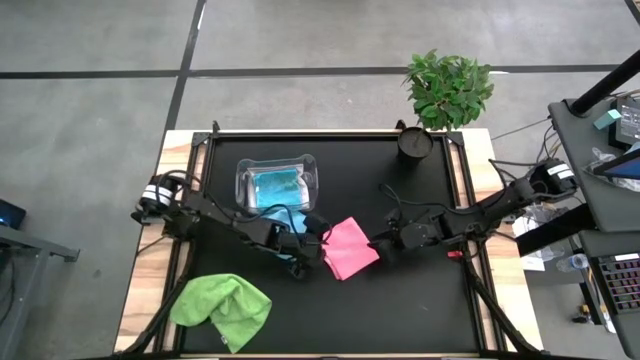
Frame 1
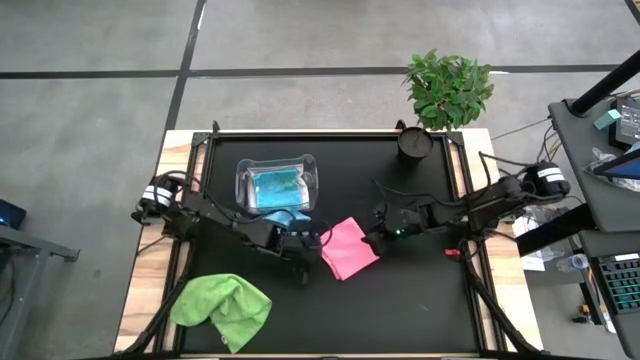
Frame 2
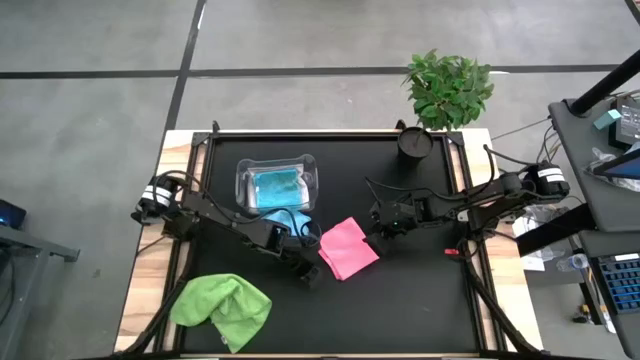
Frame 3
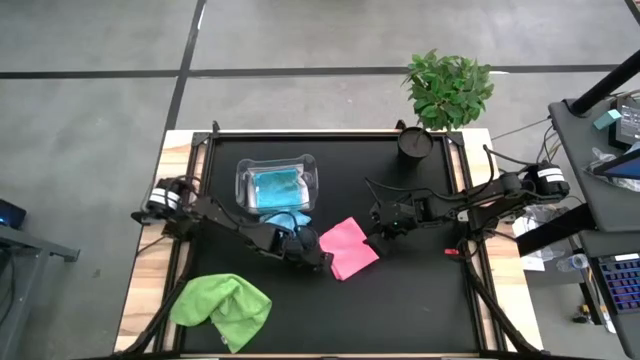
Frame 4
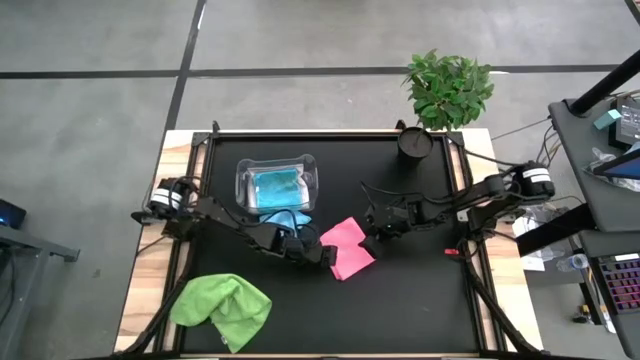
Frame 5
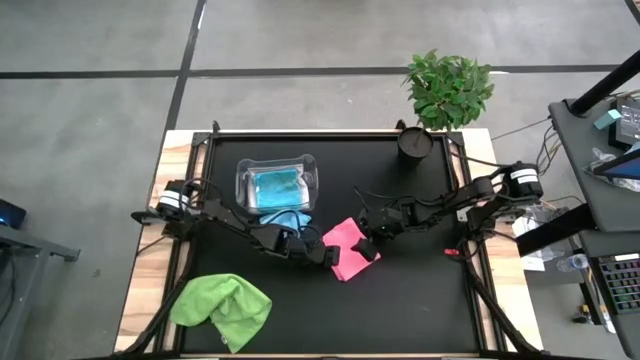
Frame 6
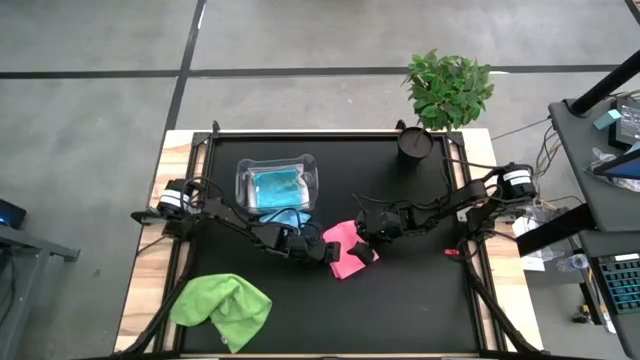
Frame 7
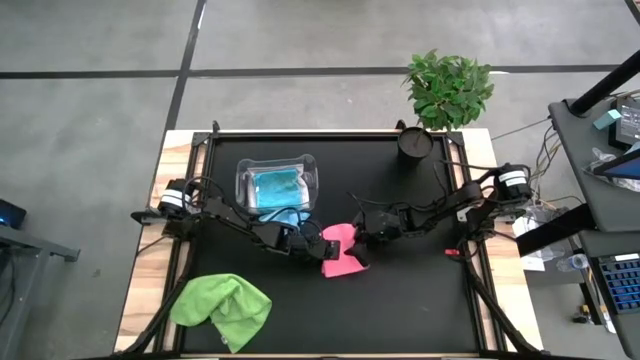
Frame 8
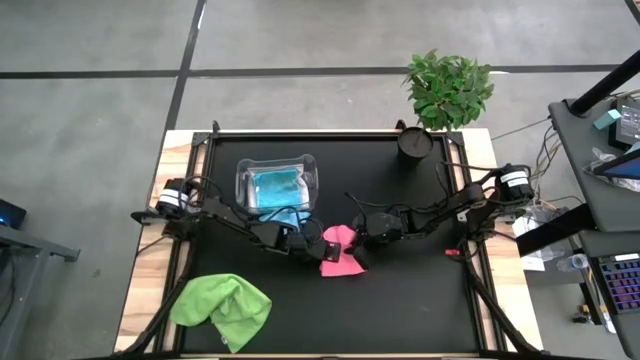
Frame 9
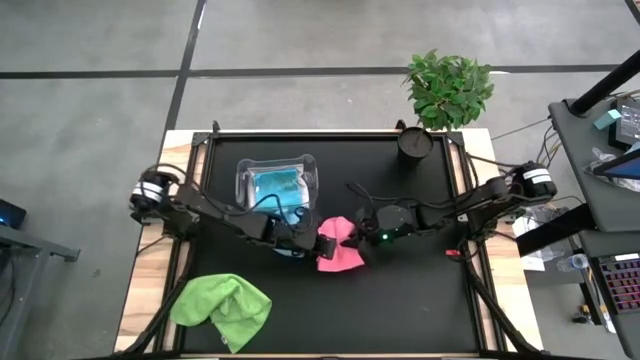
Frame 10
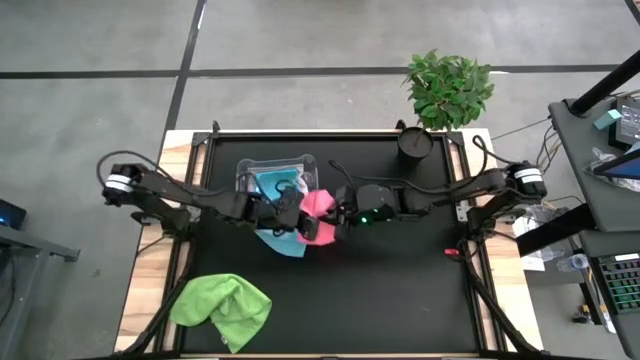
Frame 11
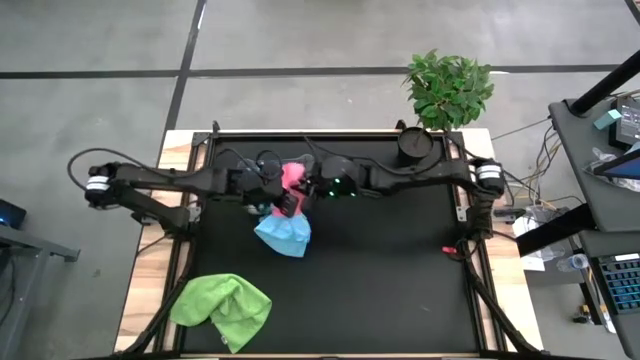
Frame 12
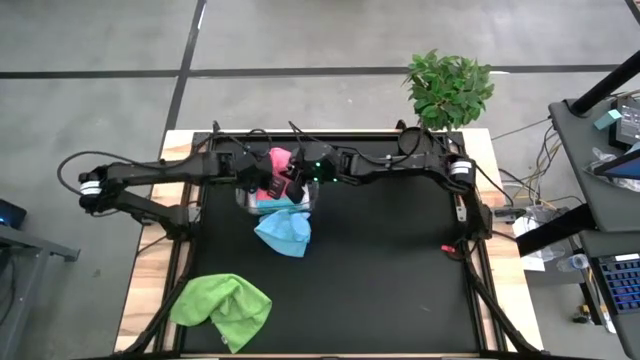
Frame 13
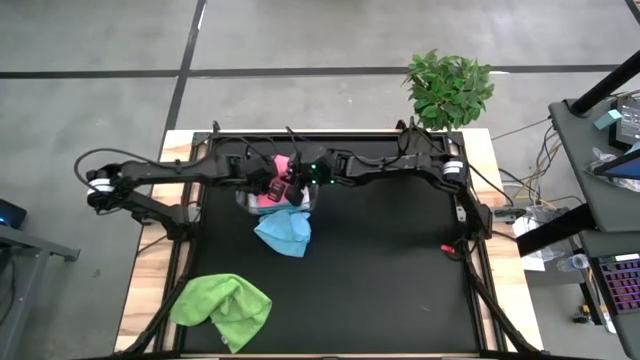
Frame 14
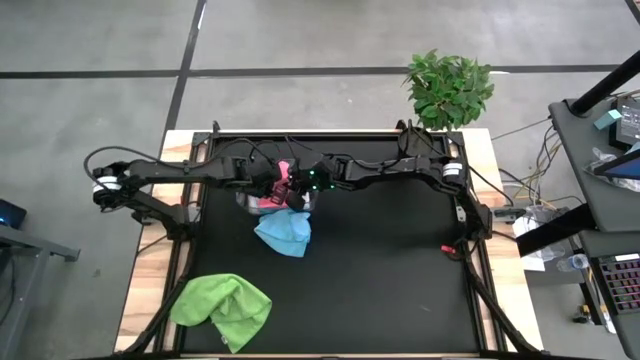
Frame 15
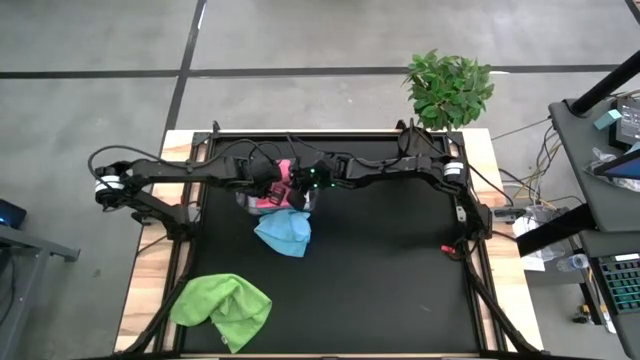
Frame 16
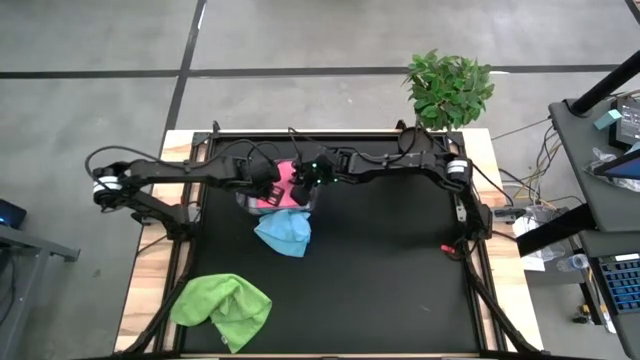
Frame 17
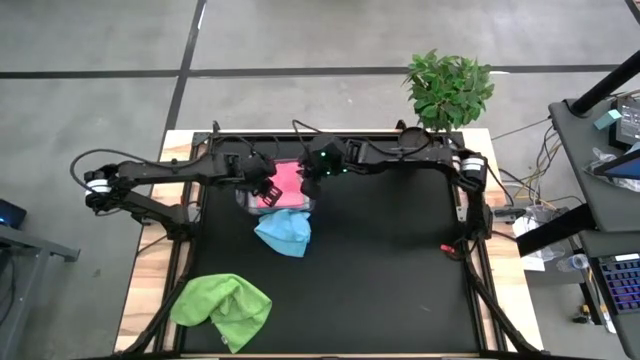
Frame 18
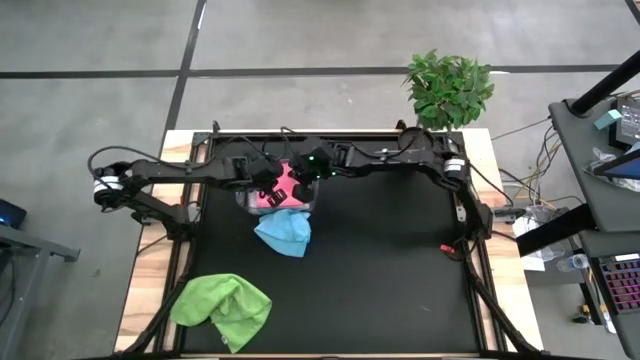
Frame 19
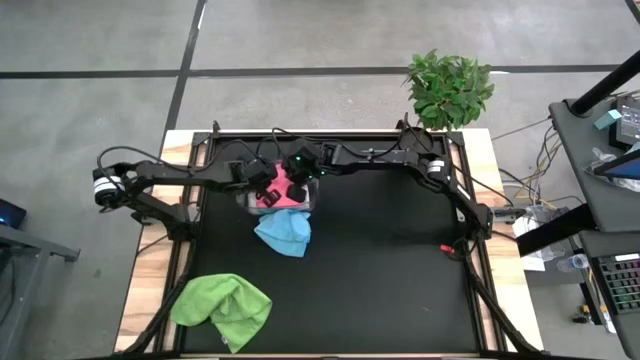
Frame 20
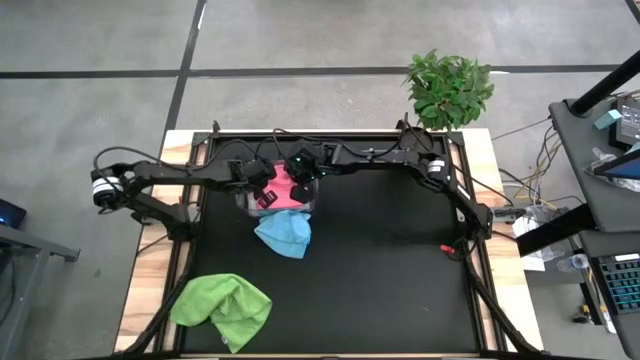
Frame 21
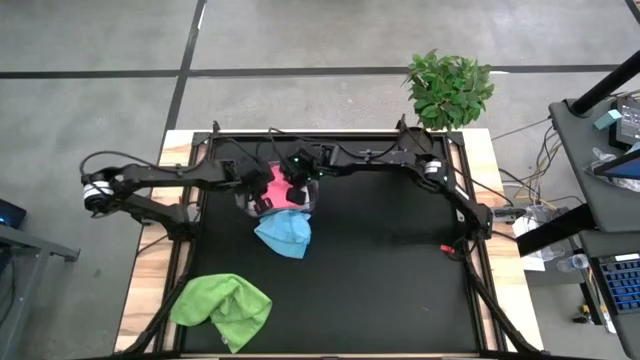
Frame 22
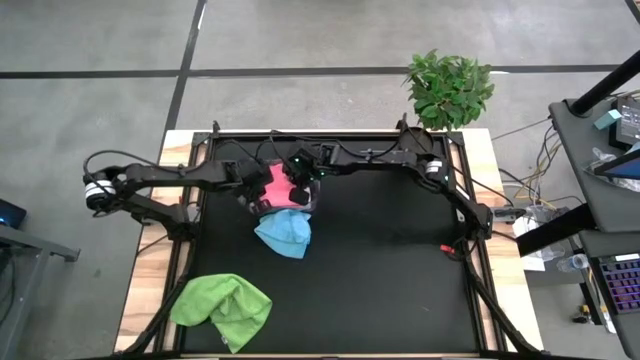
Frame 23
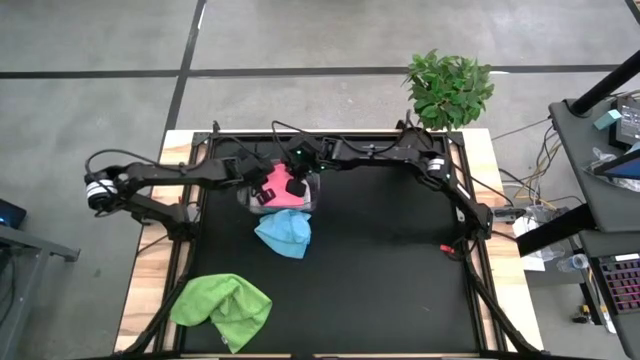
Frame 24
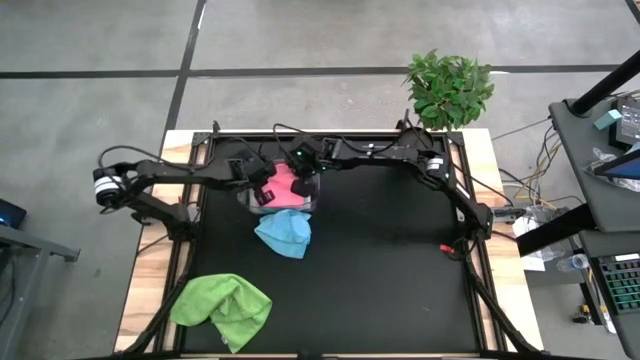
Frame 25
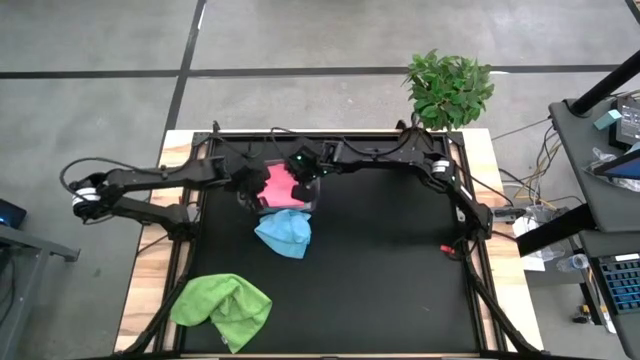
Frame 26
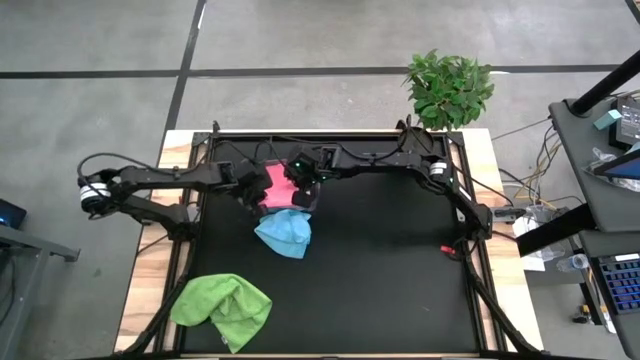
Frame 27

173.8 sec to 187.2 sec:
Task: Fold microfiber towels
Put the pink microfiber cloth into the transparent bin

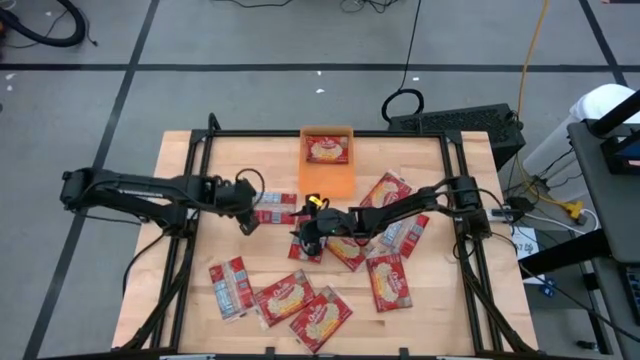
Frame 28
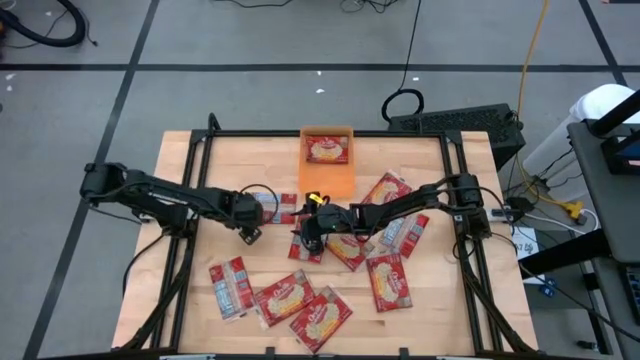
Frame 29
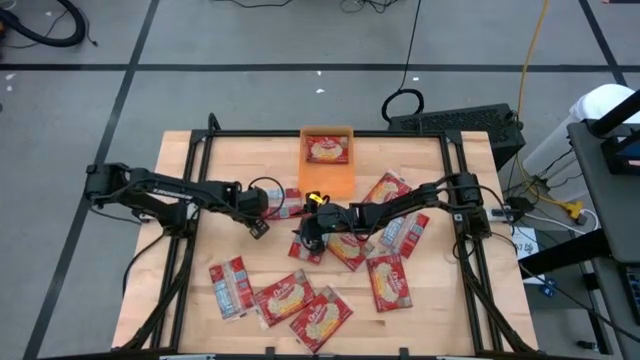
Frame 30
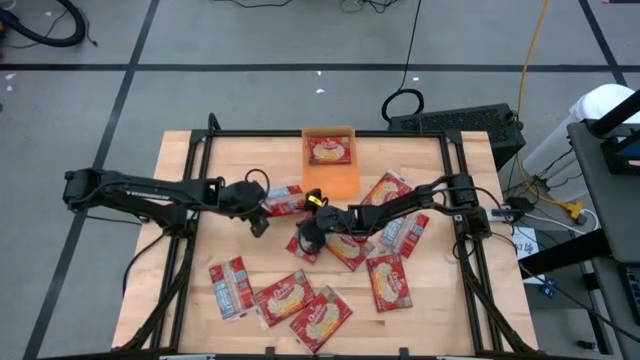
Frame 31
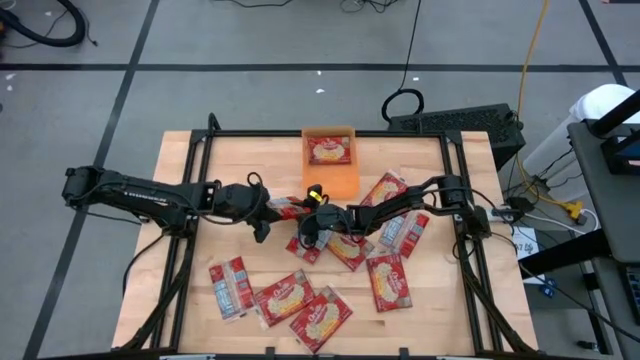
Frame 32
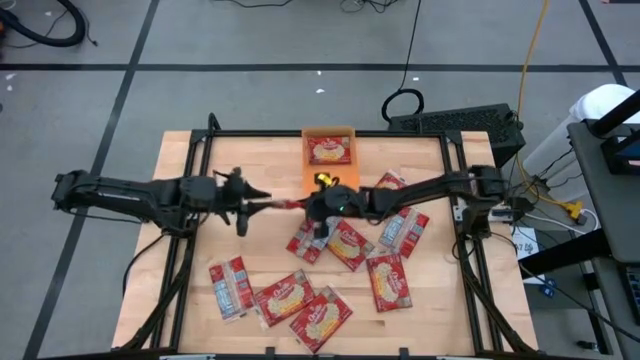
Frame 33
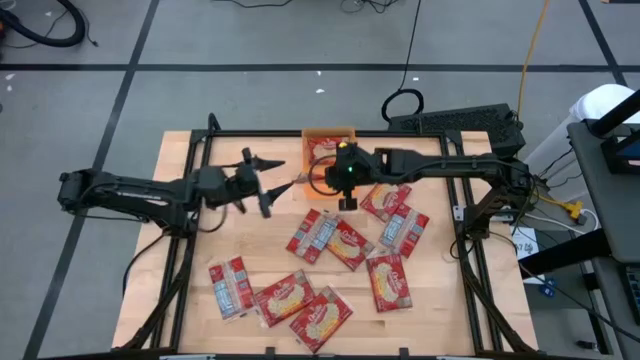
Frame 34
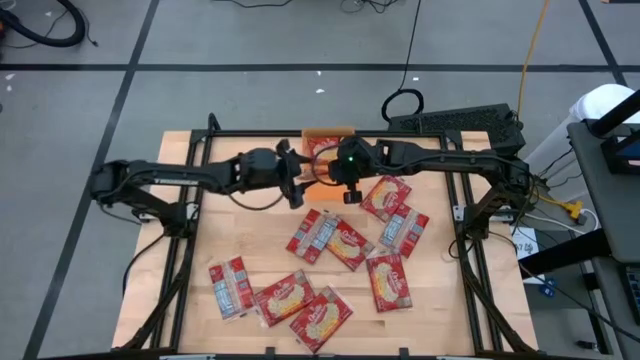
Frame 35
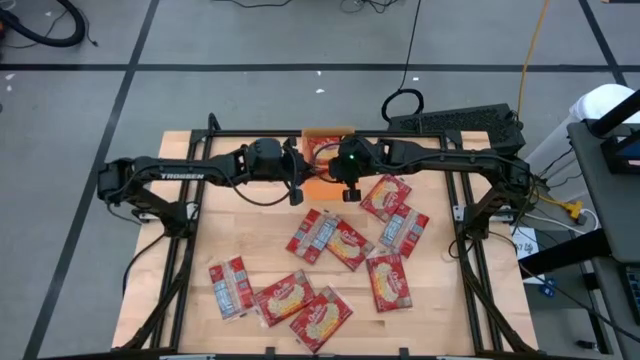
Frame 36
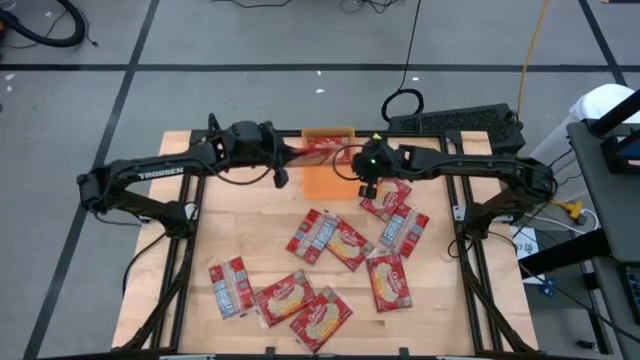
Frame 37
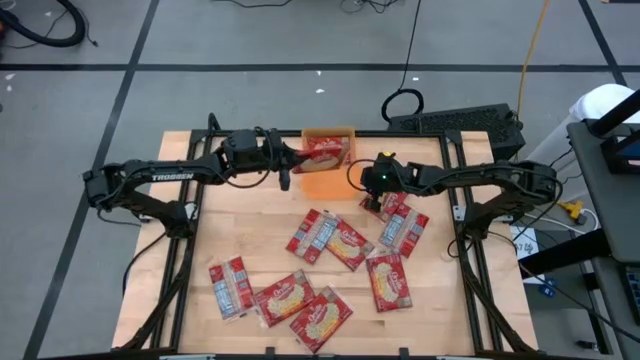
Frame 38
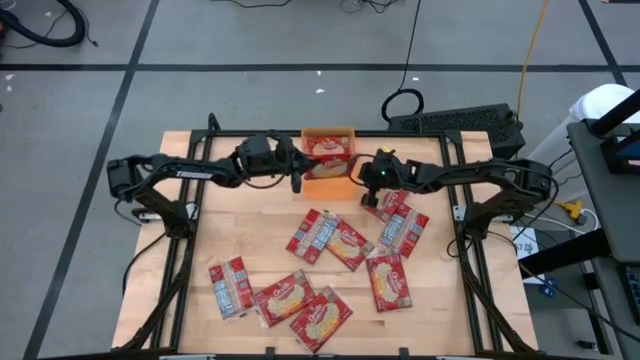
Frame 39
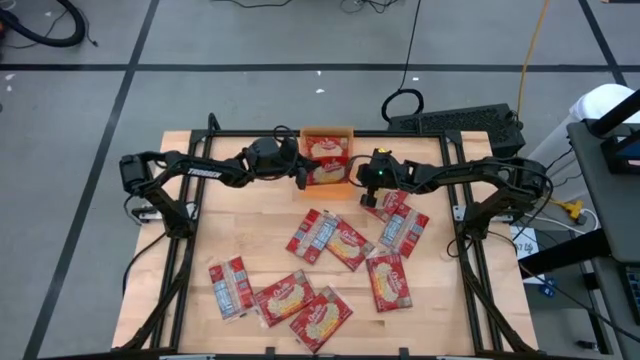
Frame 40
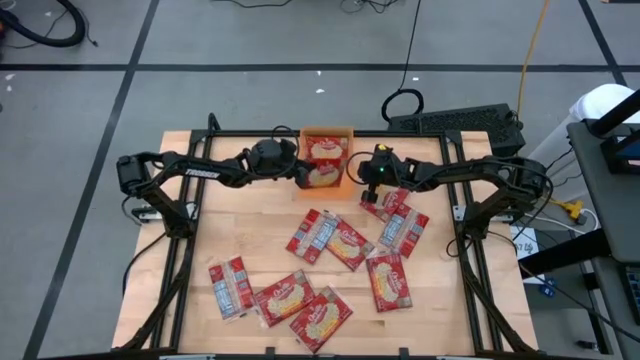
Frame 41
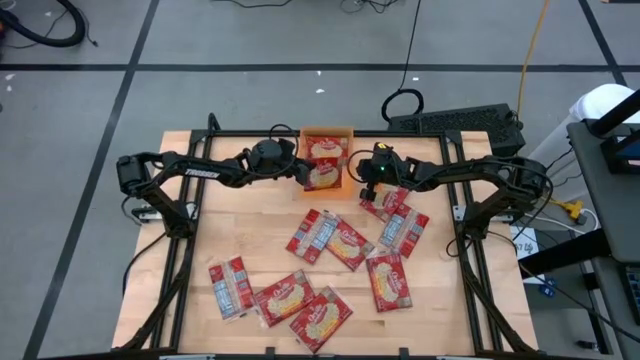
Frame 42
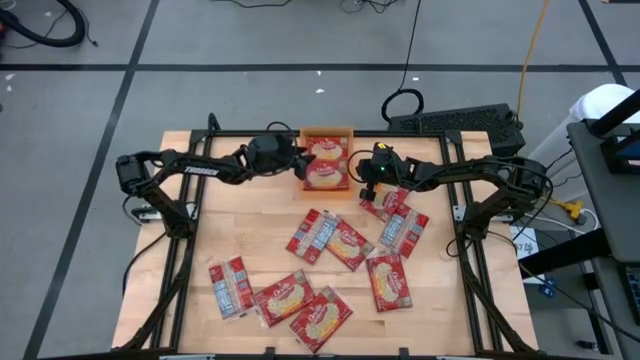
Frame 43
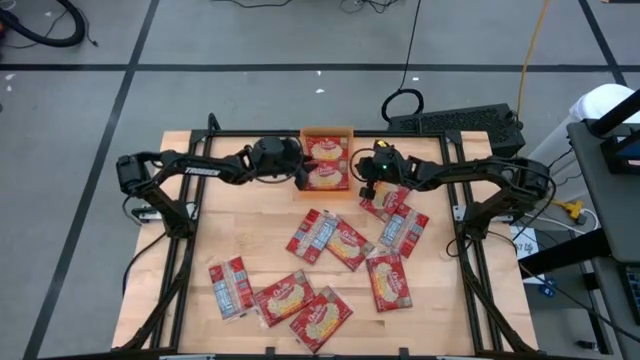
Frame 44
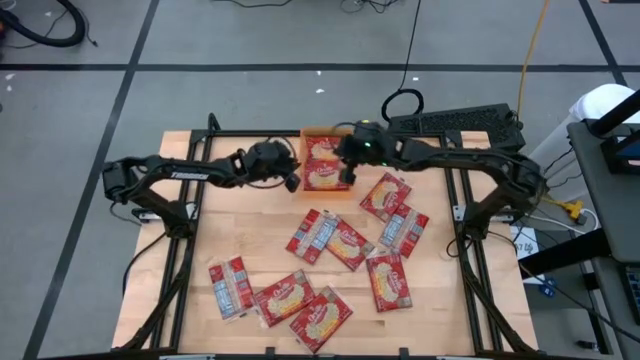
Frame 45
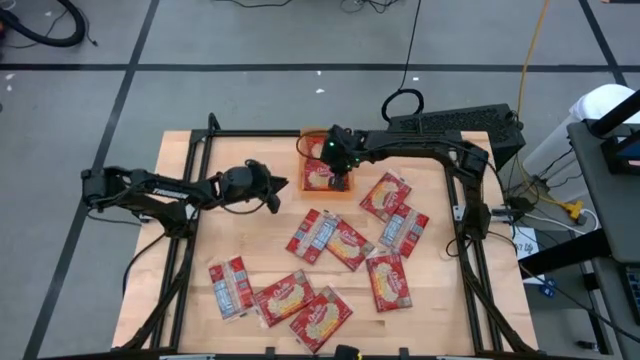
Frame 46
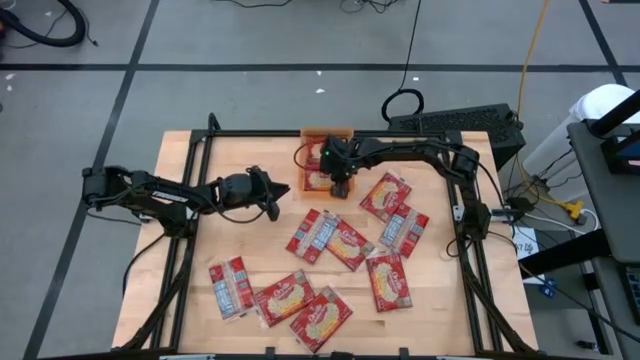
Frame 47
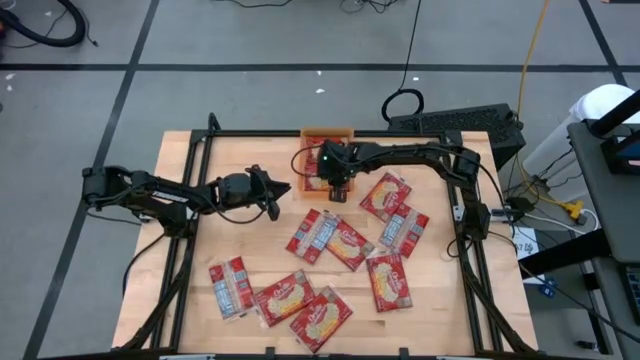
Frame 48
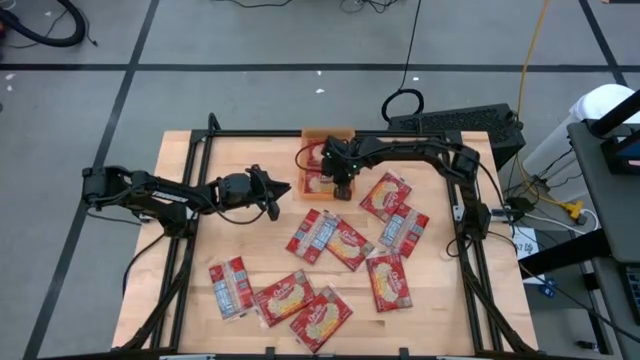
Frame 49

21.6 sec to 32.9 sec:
Task: Sort popcorn bags into baskets
Put the red popcorn bag into the orange bin
